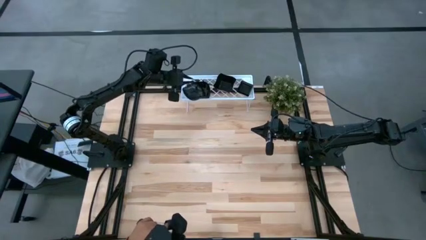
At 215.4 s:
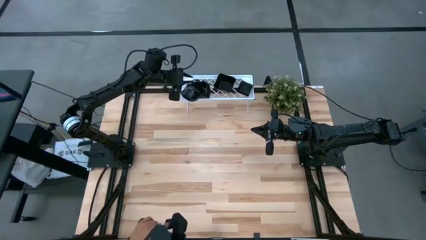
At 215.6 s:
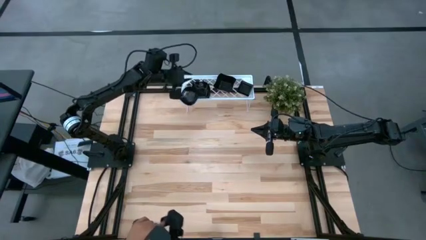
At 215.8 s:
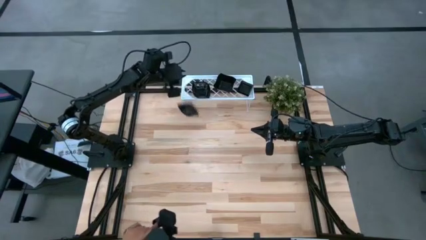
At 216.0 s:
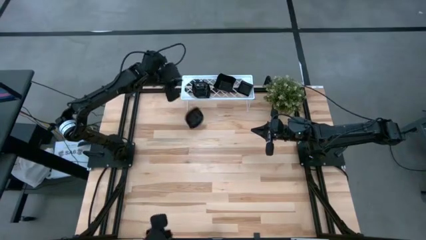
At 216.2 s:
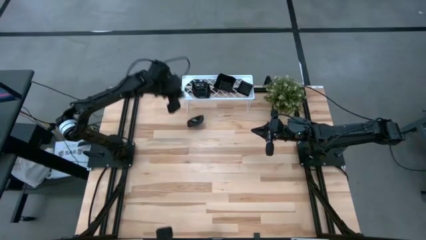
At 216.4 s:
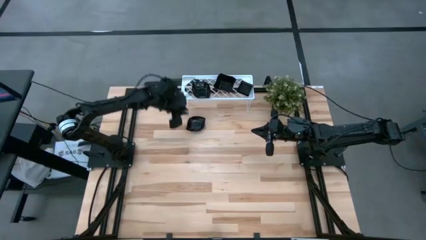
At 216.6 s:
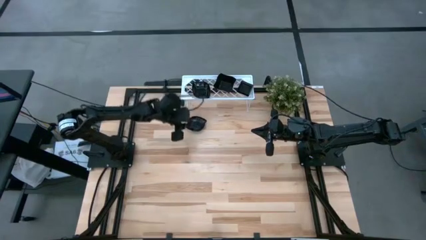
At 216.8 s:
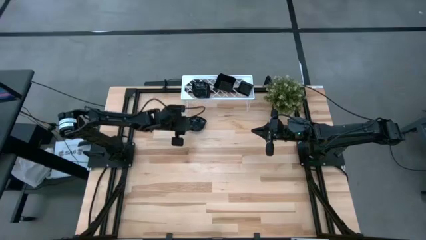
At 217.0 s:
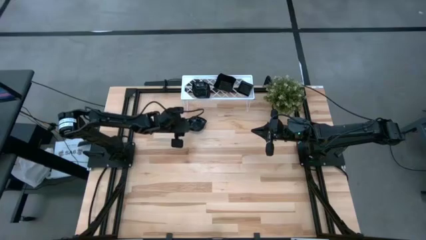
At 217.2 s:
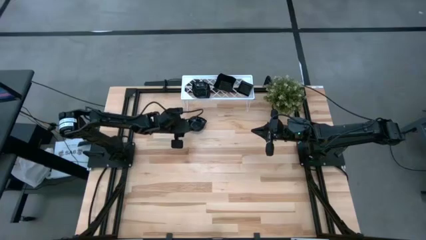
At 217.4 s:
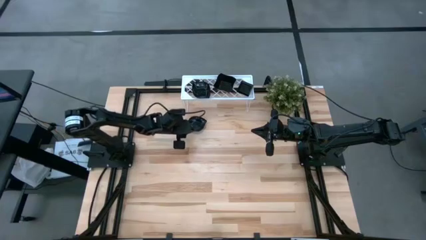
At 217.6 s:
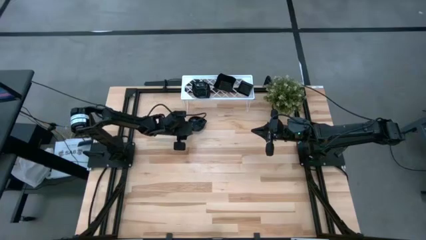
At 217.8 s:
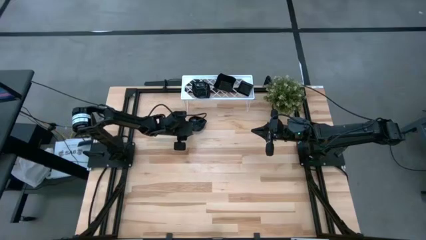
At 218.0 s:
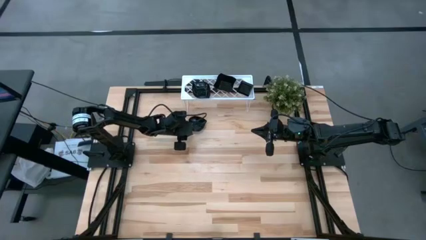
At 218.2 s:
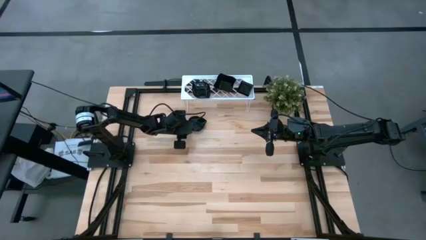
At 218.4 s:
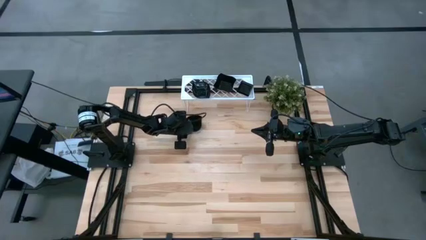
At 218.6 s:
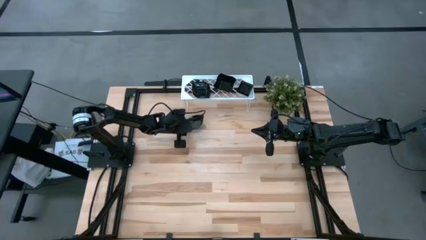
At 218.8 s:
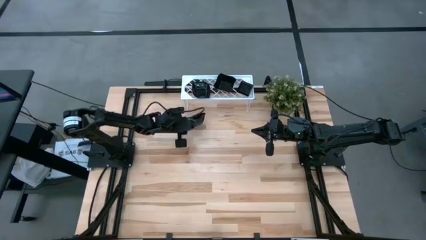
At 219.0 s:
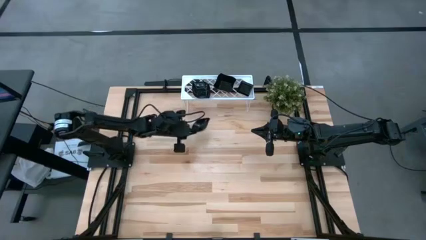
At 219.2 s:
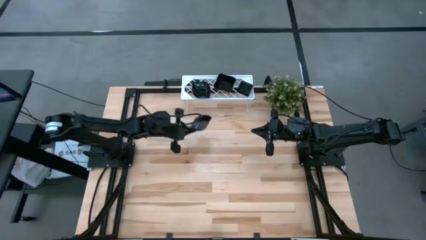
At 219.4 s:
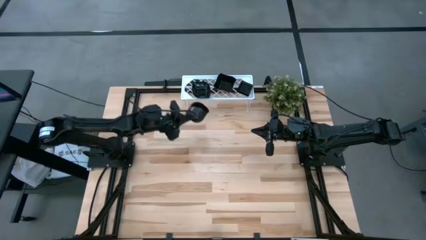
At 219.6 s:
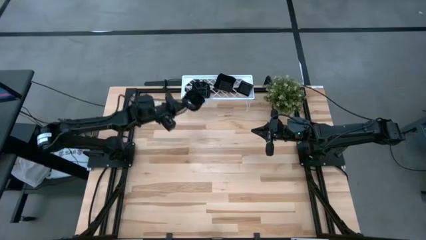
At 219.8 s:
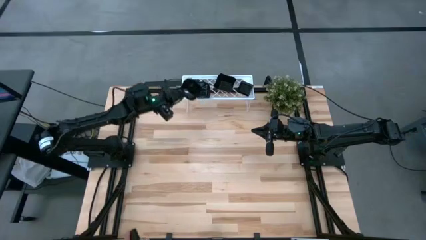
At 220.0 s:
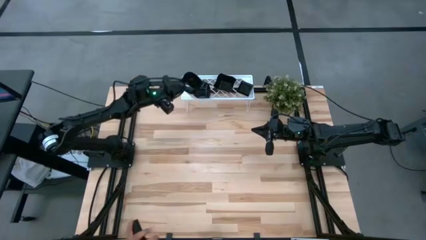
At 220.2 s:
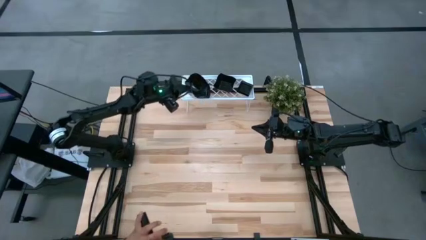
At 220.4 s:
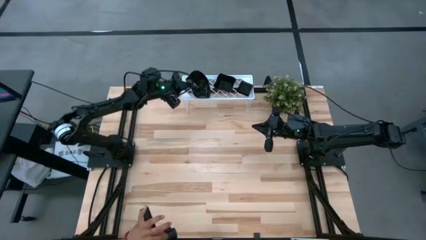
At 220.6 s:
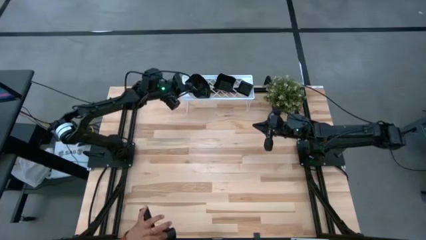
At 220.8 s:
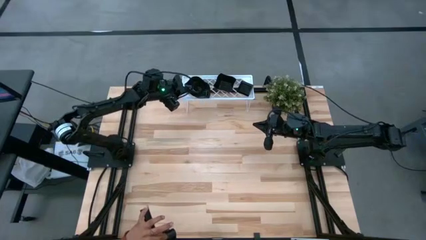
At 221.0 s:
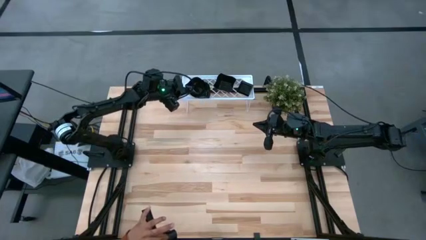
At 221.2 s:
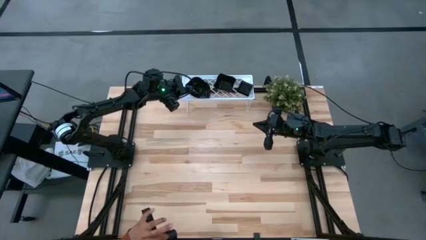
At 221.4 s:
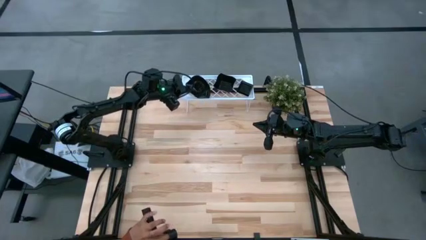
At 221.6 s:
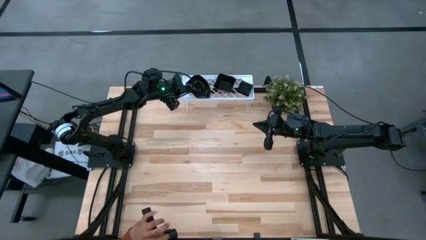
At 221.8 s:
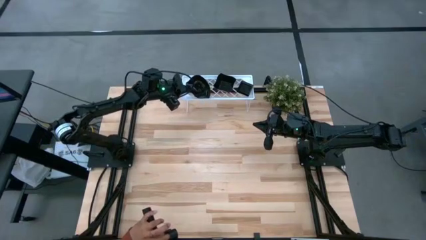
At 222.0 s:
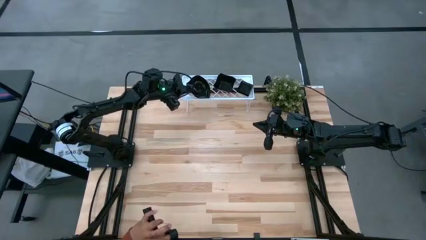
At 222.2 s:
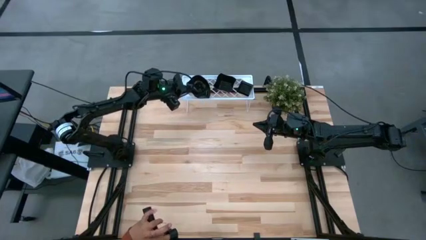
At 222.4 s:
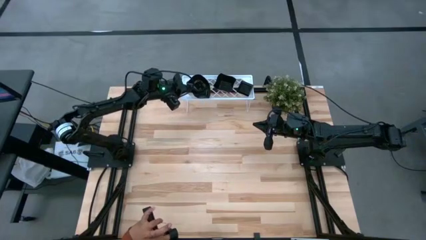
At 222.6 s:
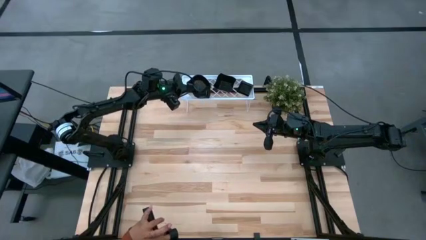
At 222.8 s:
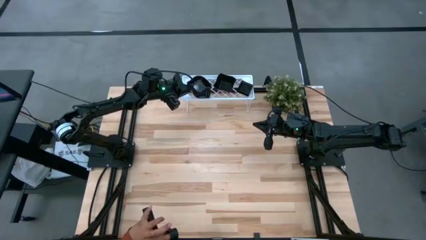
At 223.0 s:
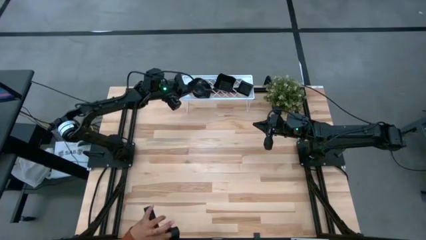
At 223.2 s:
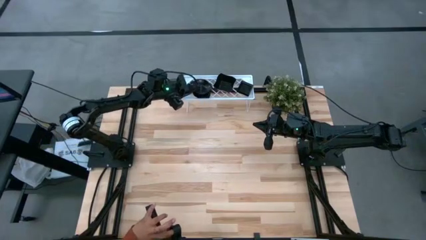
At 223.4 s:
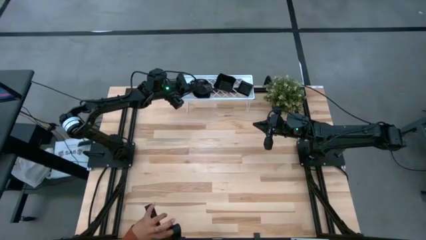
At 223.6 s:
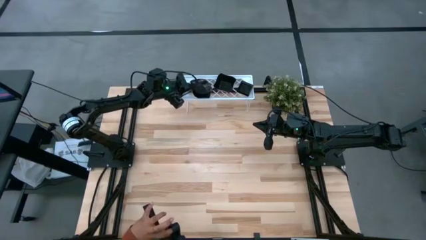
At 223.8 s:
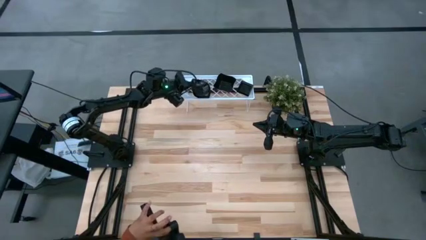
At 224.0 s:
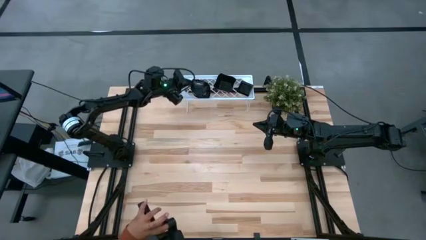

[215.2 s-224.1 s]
Task: Pick & Place Mini shaped plates
Stack the black leaf-shaped plate on top of the black leaf-shaped plate on the shelf

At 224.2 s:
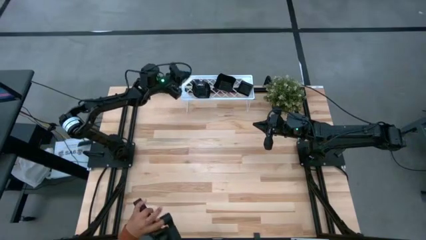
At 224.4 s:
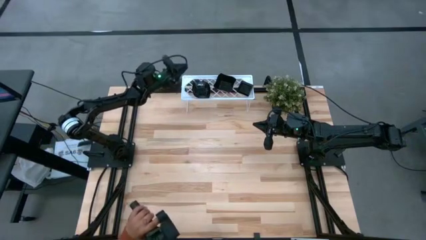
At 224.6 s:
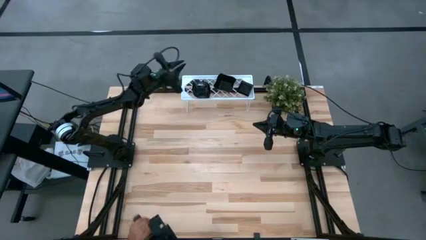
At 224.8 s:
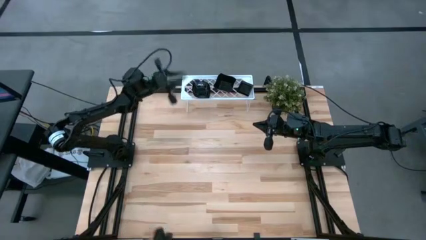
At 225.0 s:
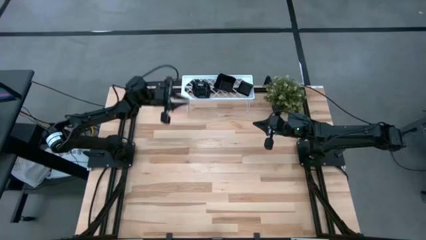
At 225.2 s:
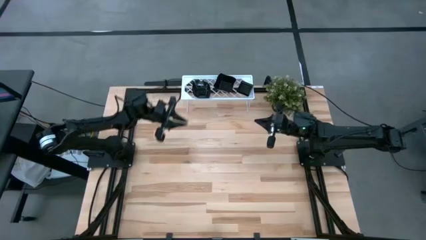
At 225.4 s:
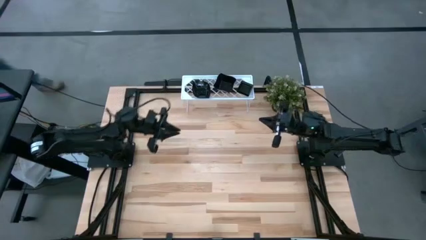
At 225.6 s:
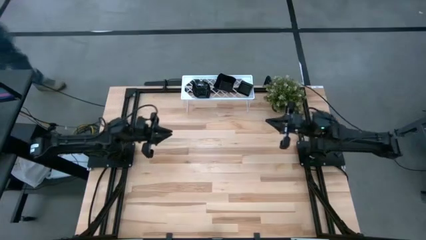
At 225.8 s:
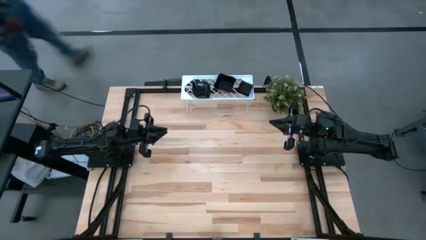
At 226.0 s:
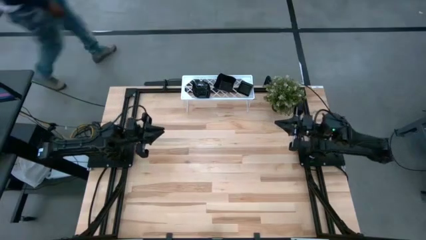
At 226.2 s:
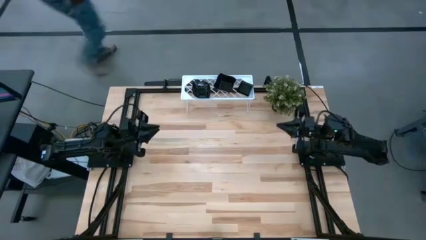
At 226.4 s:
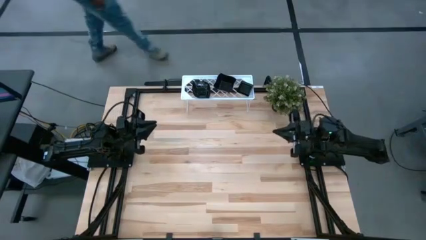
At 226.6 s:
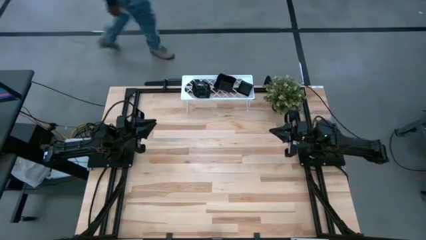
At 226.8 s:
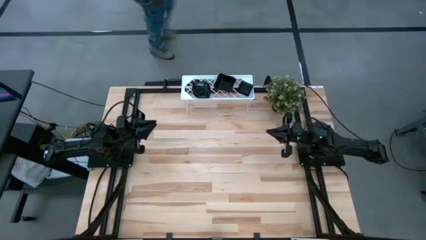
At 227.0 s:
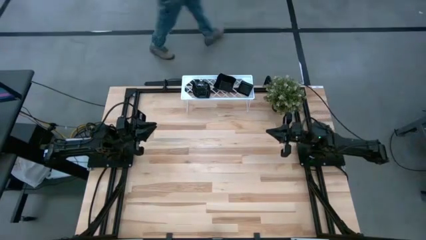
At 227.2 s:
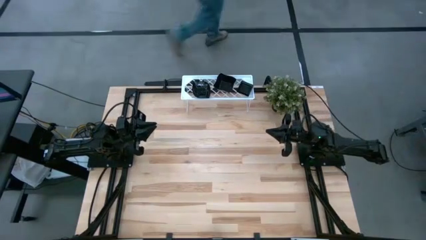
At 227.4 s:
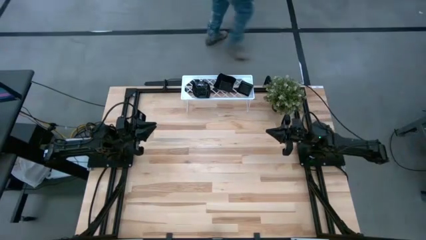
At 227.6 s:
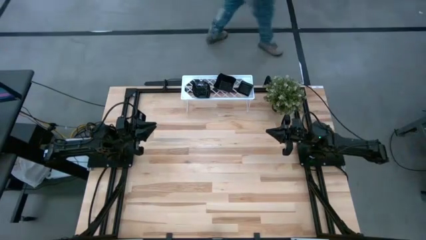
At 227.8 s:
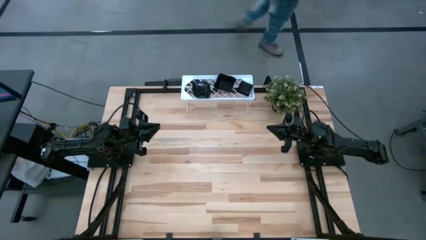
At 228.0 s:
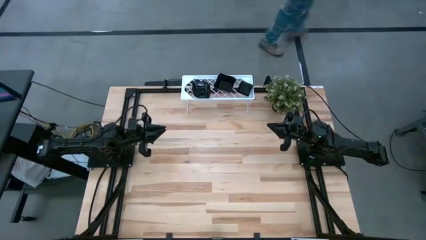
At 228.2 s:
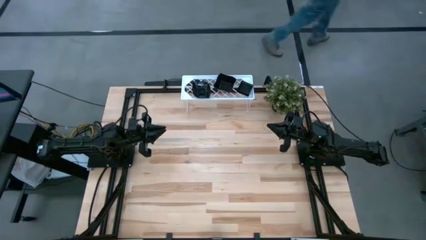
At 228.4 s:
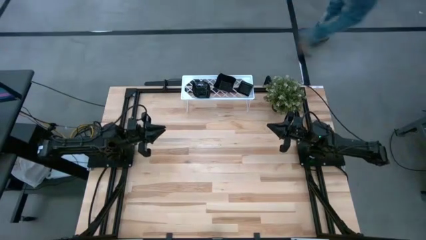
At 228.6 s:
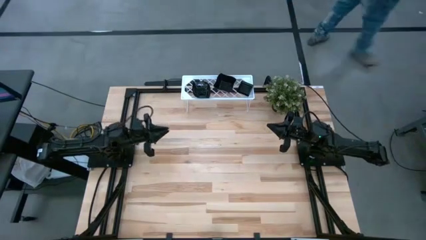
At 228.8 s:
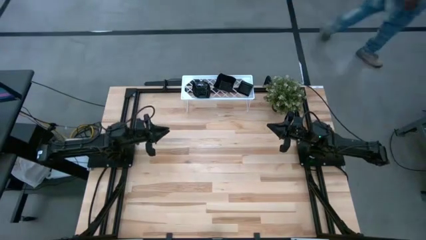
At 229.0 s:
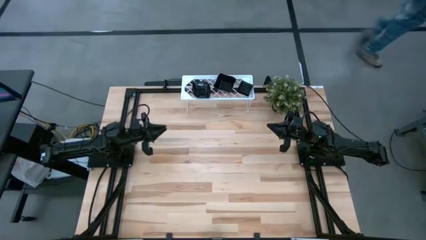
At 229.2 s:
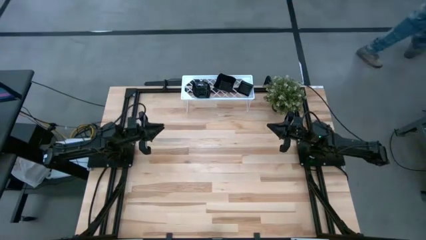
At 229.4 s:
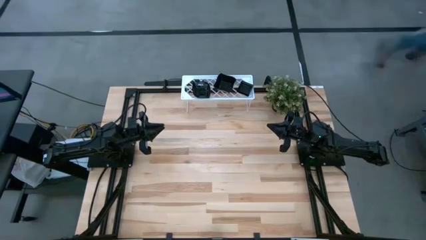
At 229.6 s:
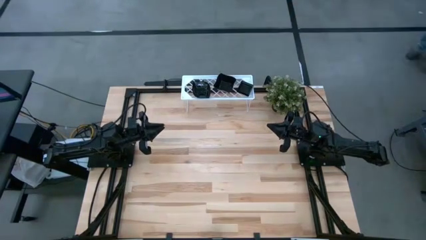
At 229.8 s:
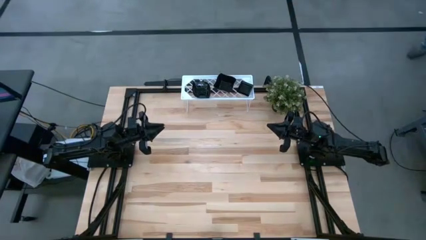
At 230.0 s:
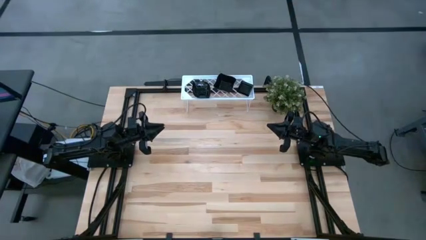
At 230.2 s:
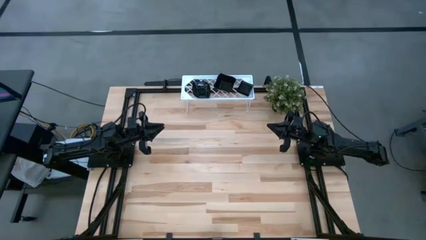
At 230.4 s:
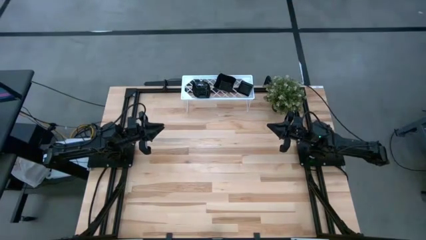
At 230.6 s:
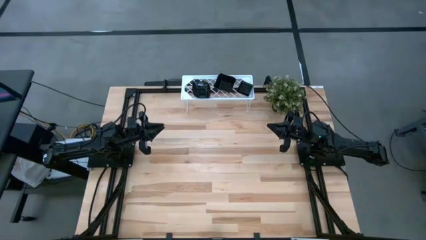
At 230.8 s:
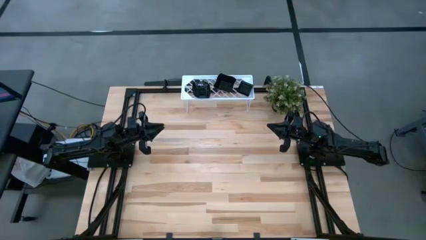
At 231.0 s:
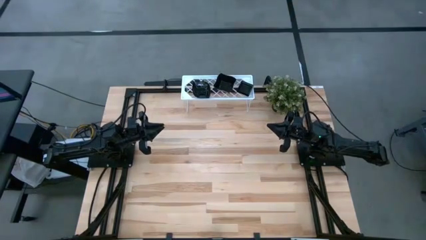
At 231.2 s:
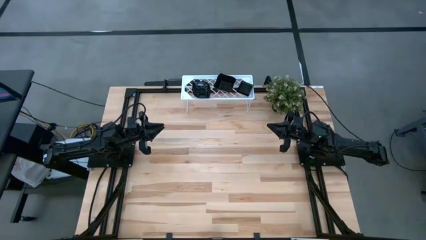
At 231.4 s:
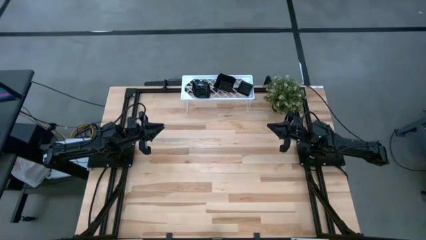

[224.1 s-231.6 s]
Return to Home Position

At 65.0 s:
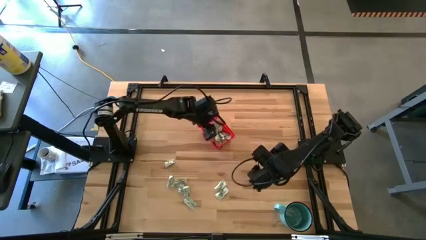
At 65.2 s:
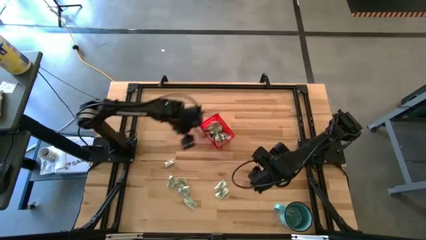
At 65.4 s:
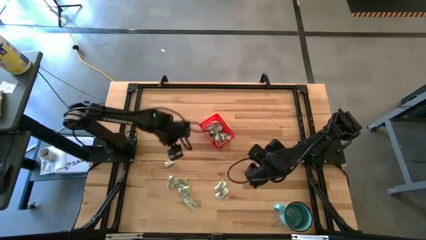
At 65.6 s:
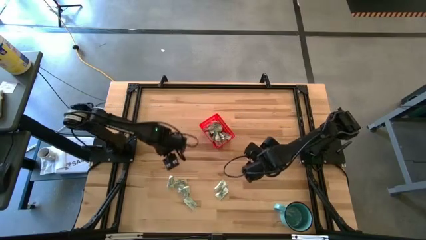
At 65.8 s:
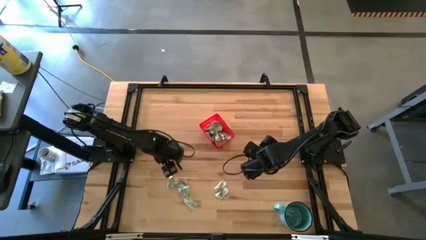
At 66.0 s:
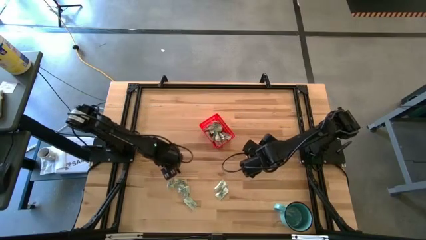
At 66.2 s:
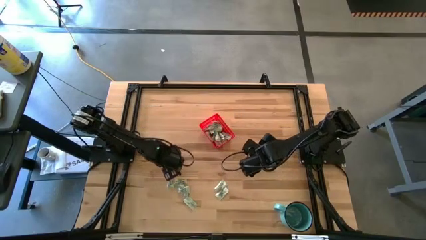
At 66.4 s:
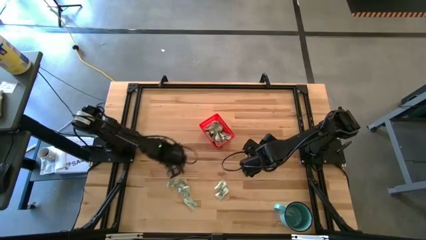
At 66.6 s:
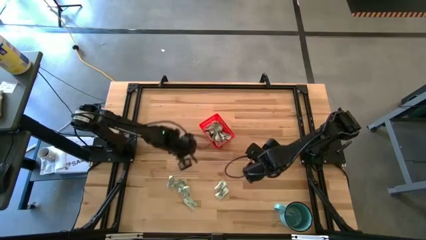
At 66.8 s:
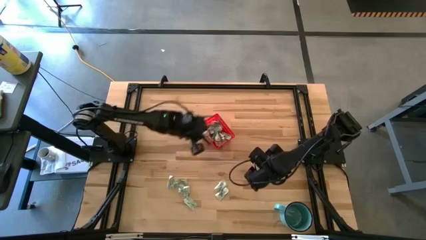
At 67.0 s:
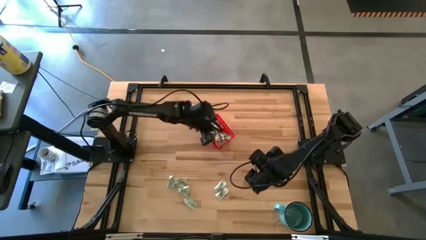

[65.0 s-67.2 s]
Task: Pick and place Stevia / Truvia into bins
Put the truvia packet into the red basket
